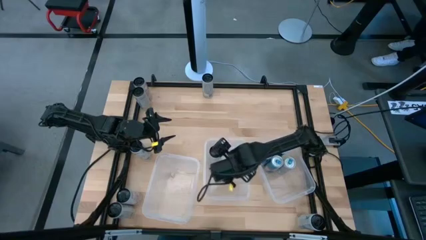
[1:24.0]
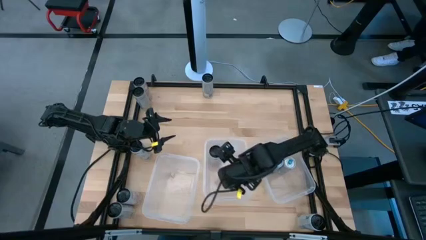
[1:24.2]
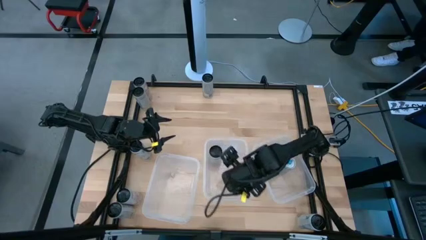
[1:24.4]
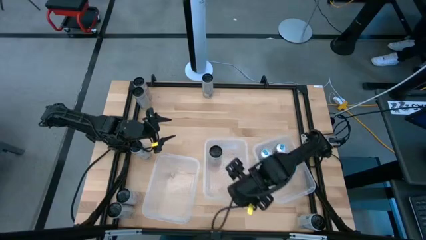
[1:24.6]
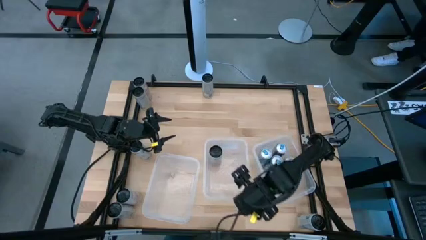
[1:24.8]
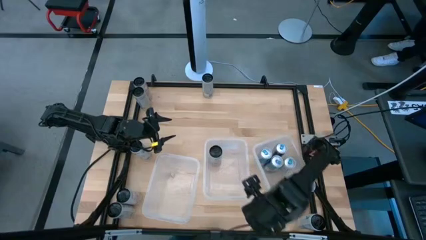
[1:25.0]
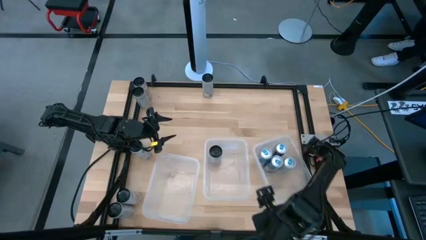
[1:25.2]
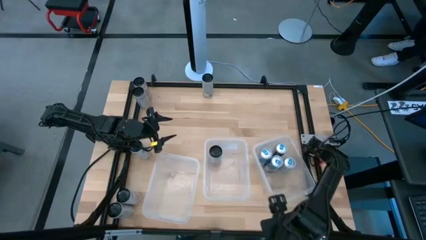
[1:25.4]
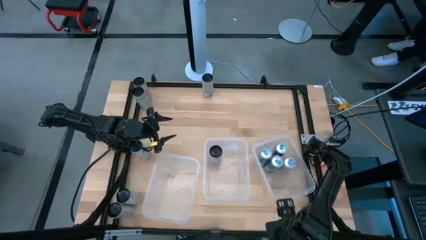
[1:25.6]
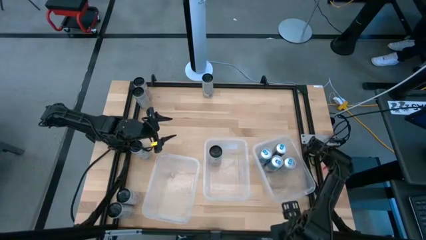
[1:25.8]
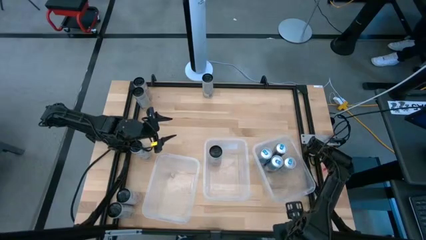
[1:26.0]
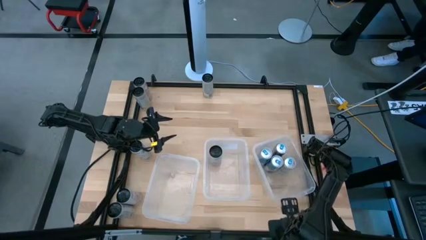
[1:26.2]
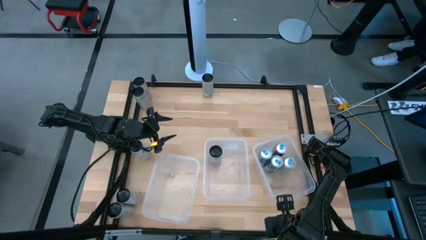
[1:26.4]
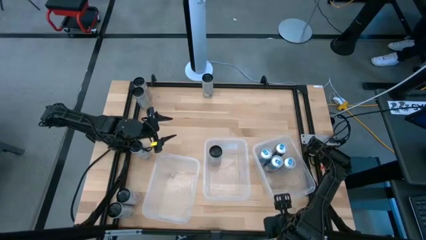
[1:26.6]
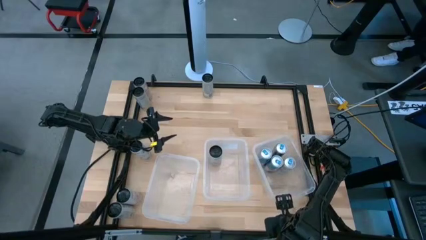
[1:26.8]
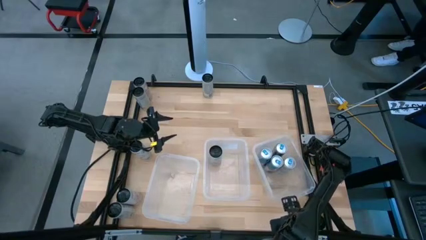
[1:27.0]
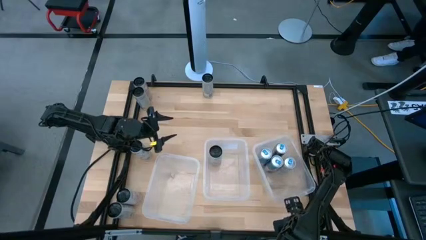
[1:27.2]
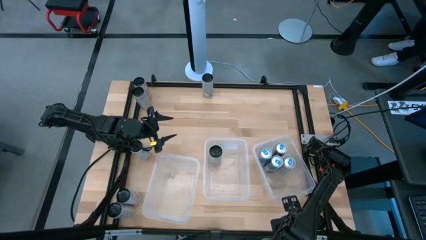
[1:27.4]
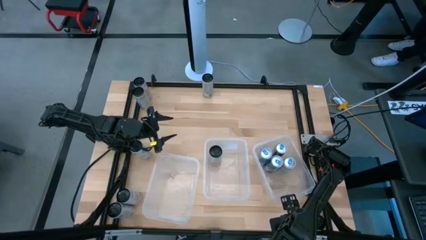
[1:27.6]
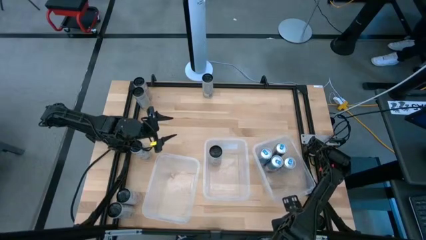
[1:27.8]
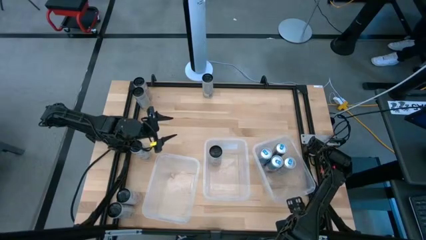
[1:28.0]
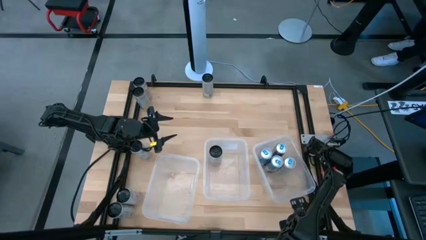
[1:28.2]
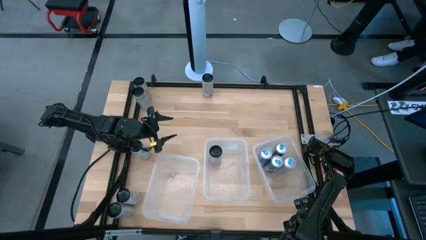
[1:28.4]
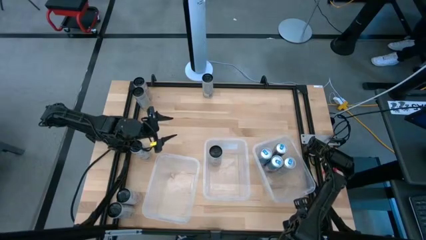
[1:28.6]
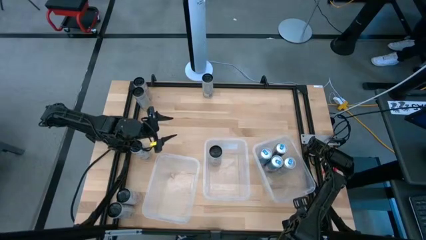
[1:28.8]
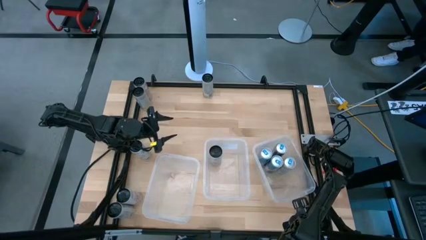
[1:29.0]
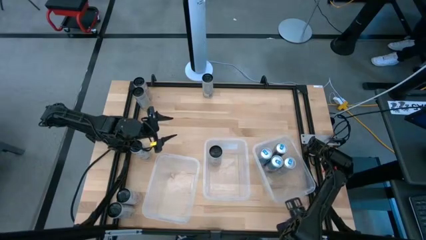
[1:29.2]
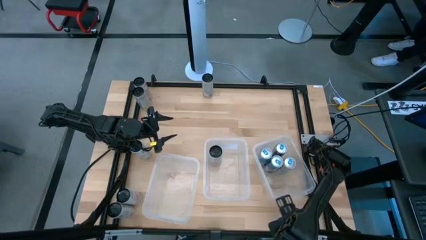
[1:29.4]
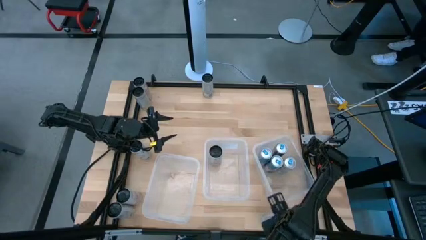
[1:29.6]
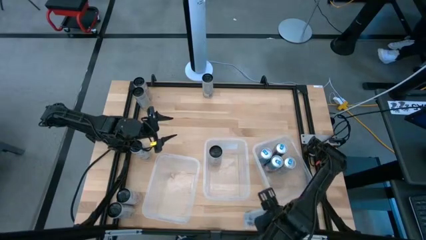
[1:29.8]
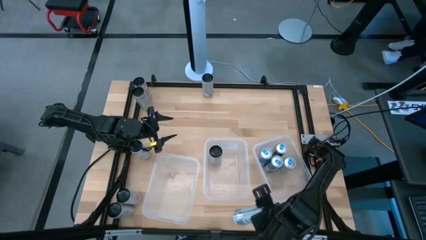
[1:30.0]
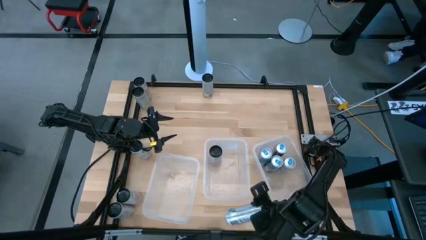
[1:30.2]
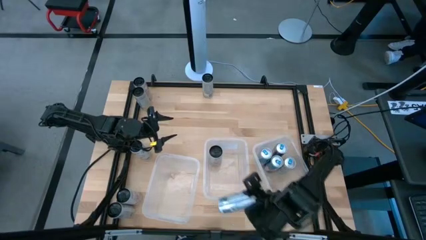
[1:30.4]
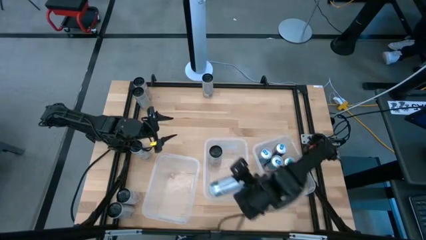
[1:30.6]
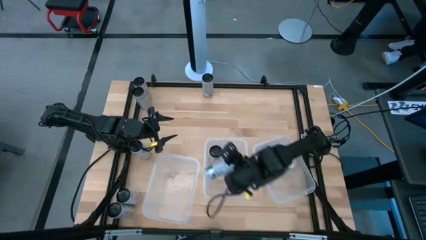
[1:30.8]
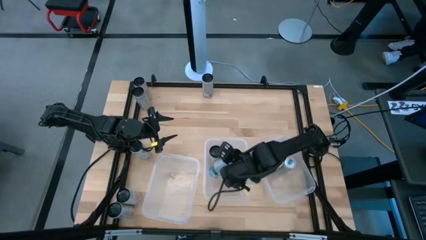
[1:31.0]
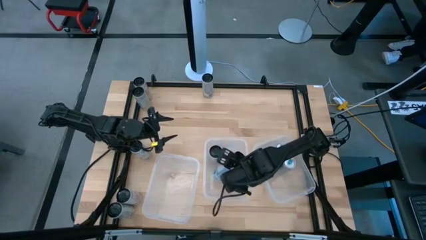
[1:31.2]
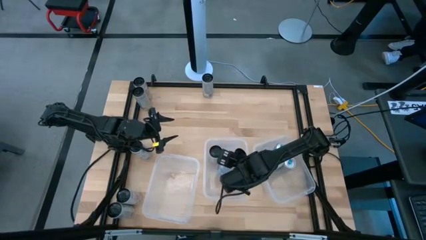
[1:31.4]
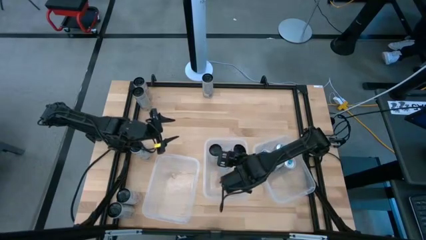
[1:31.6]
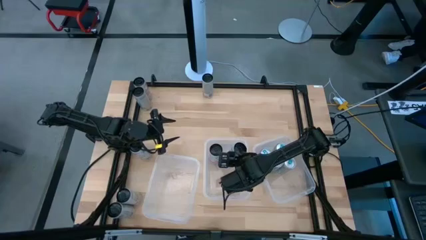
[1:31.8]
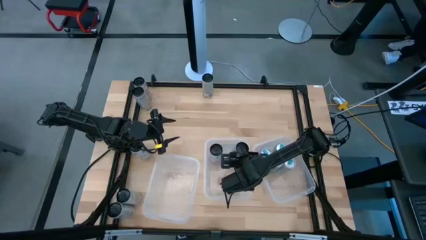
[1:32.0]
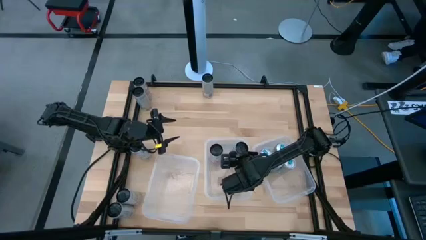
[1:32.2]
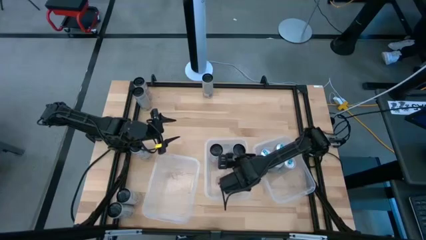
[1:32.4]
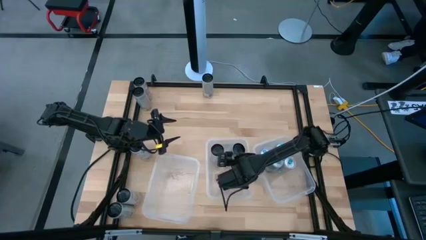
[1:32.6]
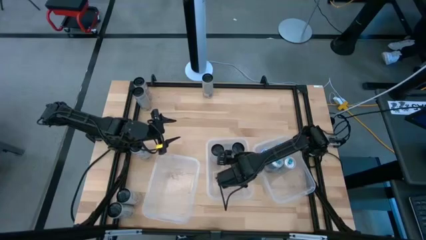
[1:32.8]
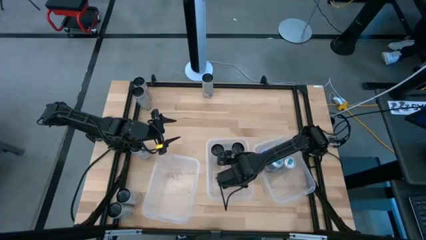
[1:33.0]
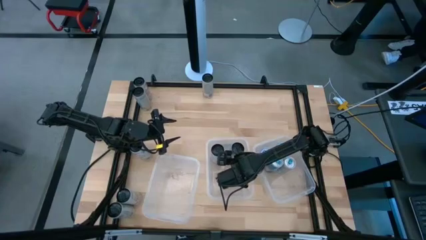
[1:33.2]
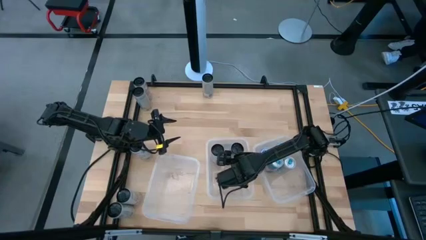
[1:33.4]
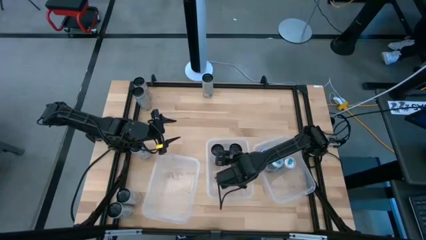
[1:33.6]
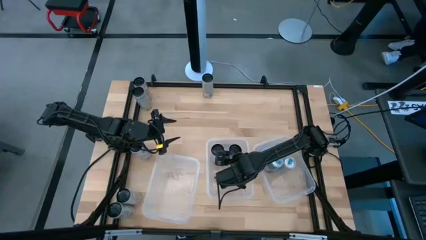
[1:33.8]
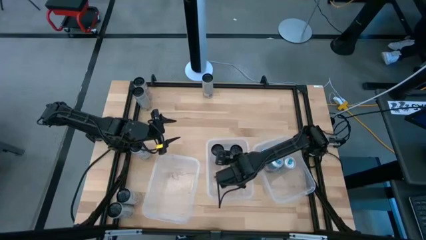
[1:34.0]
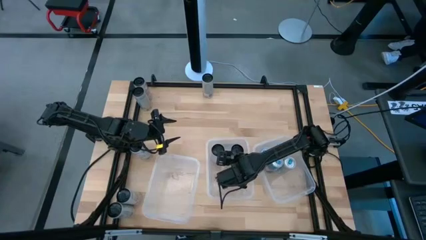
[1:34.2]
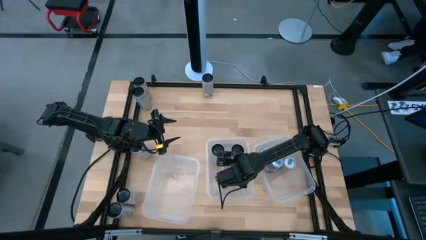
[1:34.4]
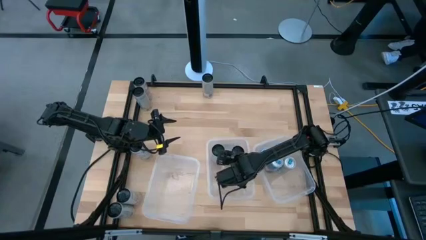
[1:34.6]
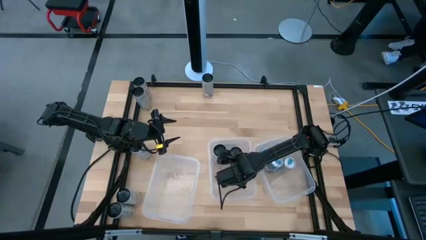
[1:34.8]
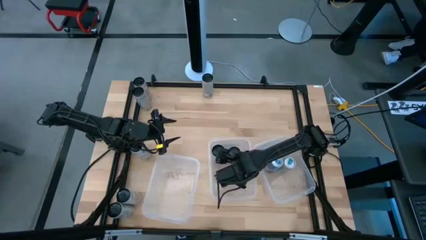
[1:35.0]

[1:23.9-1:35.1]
Task: Sort soda cans
Put the bottom white-pink soda can into the middle transparent bin

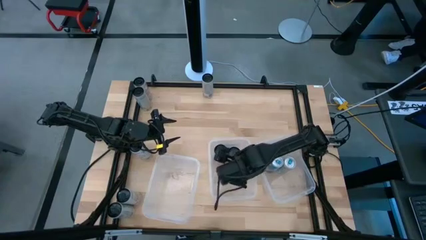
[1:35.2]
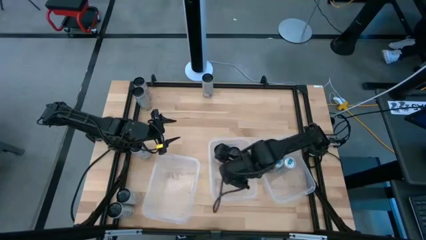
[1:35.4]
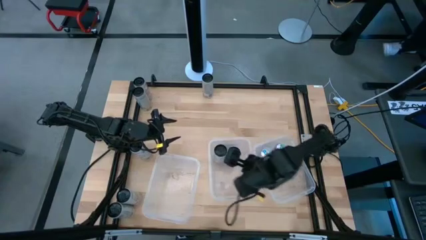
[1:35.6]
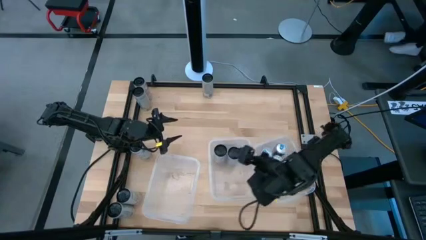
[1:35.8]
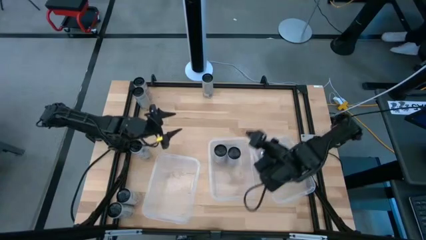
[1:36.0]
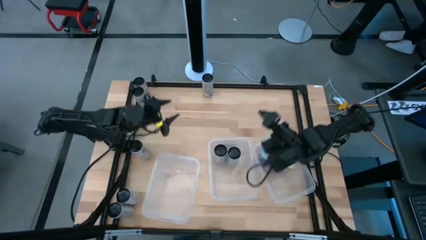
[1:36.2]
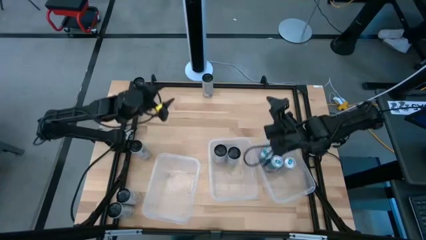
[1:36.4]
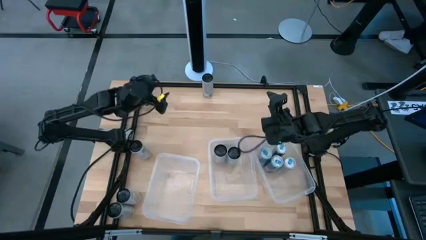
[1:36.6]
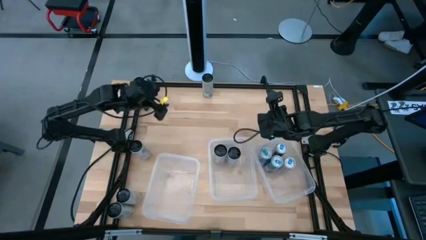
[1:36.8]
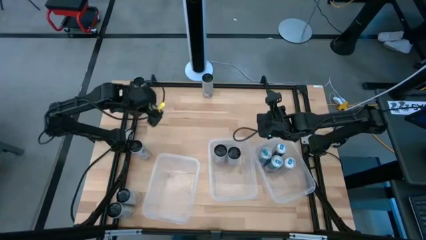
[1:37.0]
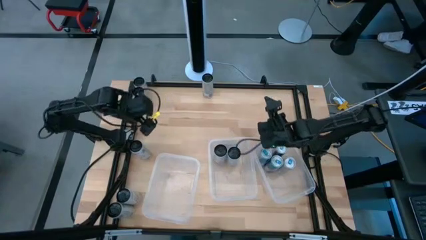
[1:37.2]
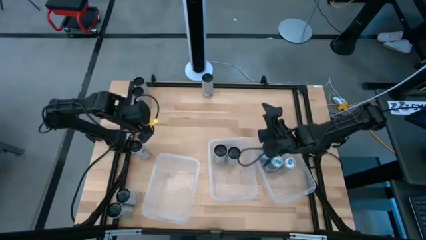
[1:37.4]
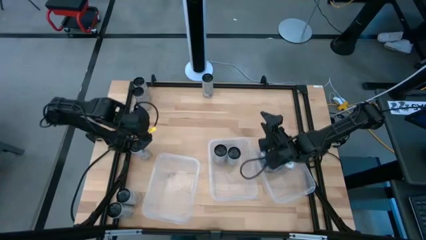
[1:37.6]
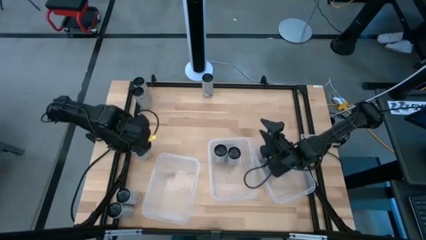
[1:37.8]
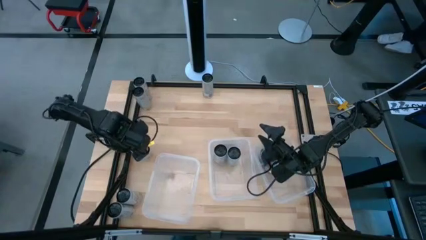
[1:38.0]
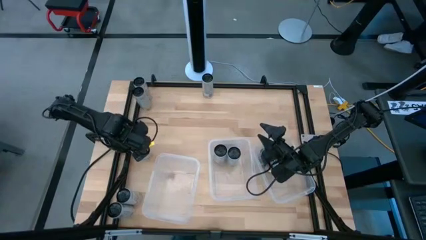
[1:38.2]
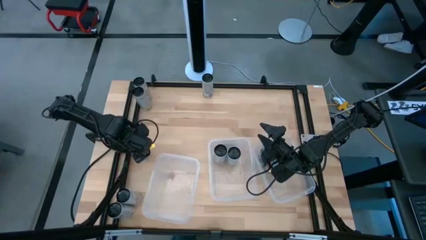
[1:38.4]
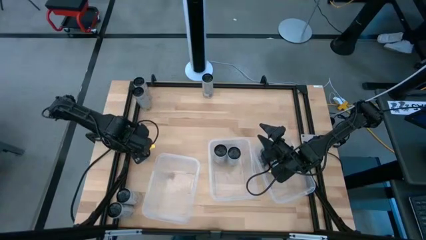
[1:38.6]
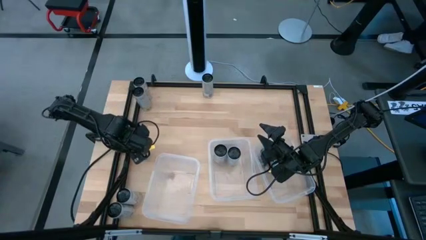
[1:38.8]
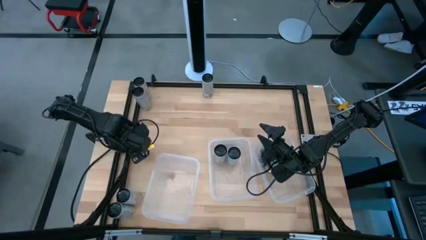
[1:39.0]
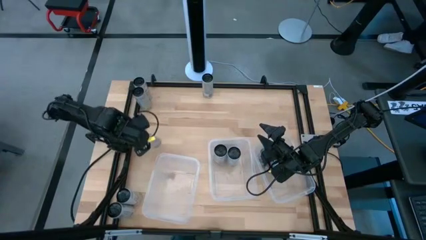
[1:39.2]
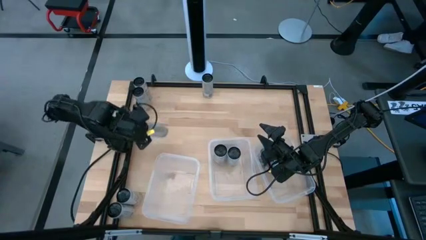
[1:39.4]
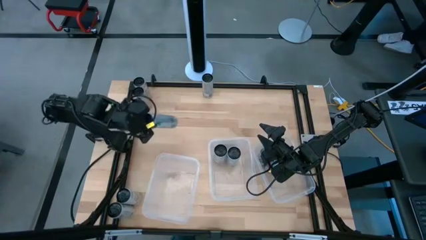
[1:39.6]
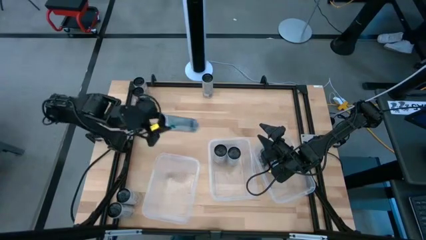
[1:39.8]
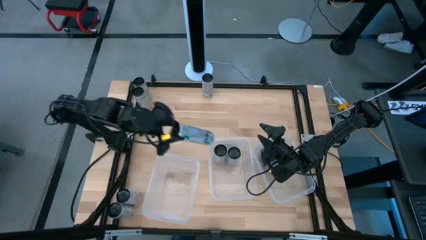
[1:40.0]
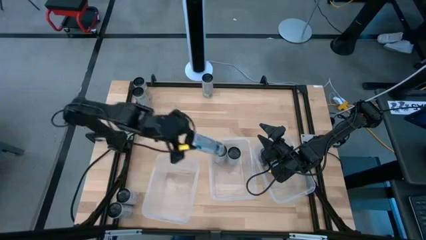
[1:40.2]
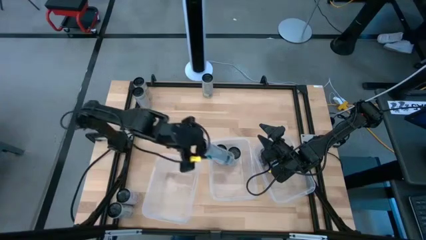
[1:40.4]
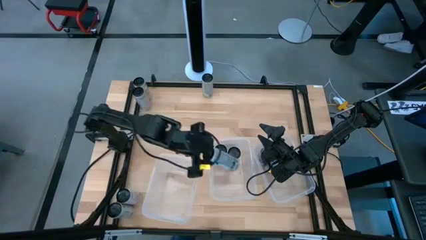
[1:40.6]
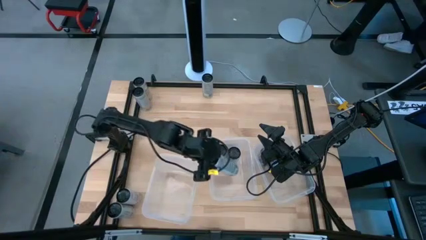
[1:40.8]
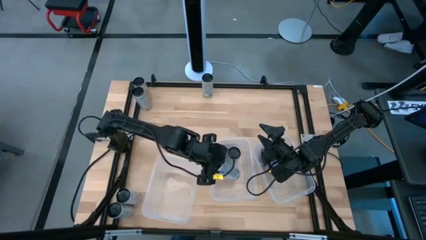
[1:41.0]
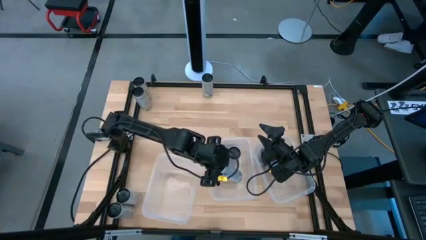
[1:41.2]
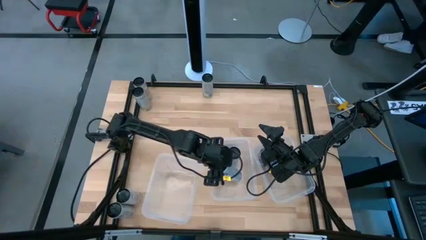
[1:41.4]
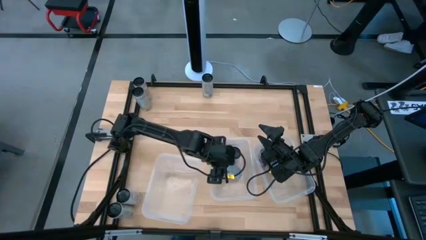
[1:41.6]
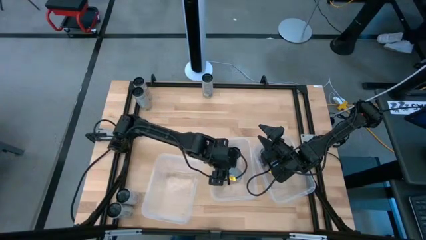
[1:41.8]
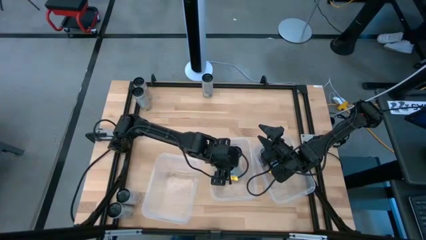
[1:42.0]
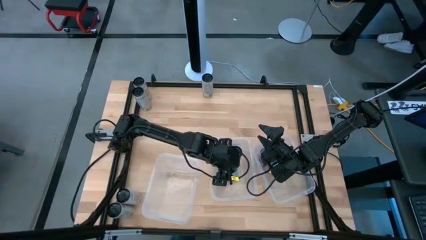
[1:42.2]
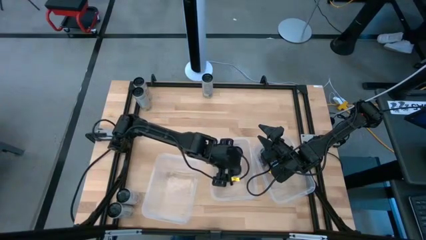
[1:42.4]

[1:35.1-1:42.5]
Put the top white-pink soda can into the middle transparent bin
